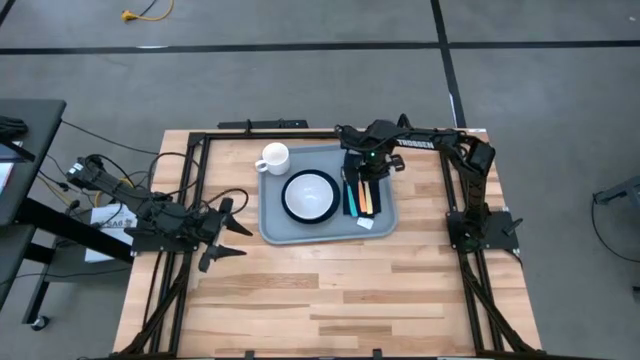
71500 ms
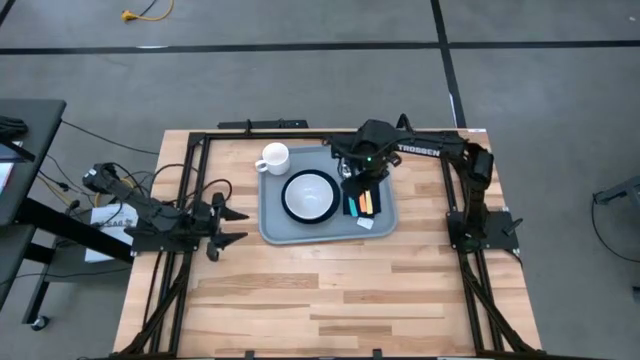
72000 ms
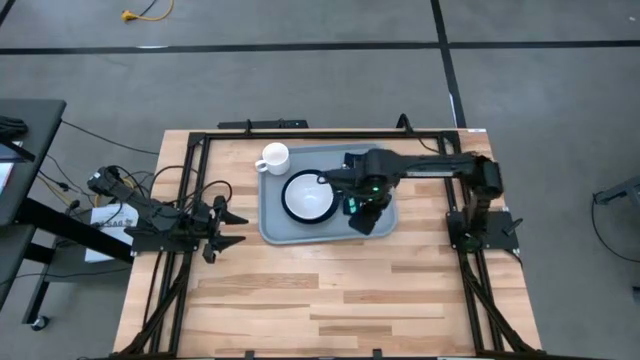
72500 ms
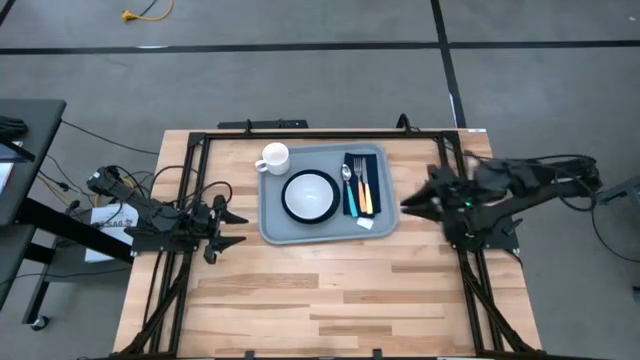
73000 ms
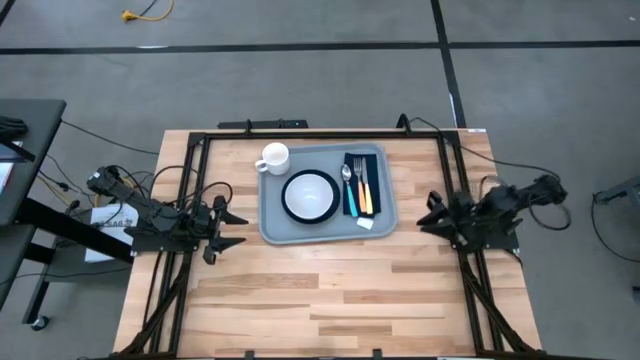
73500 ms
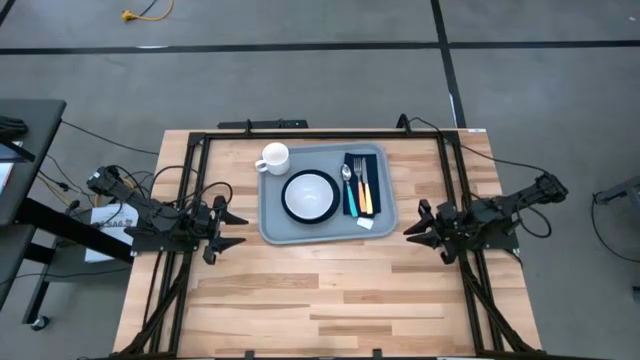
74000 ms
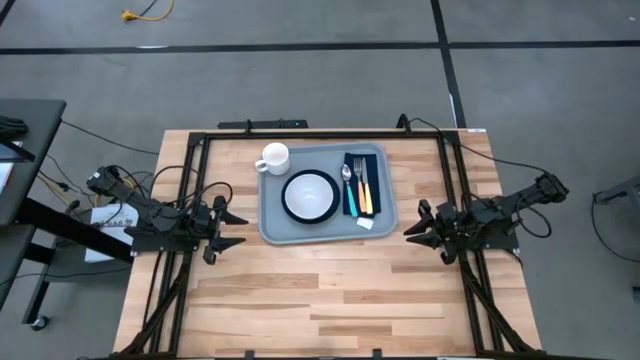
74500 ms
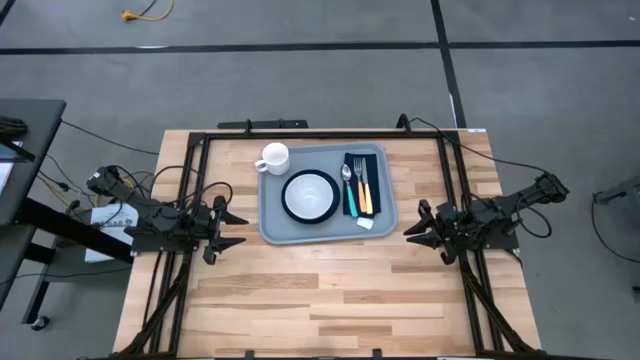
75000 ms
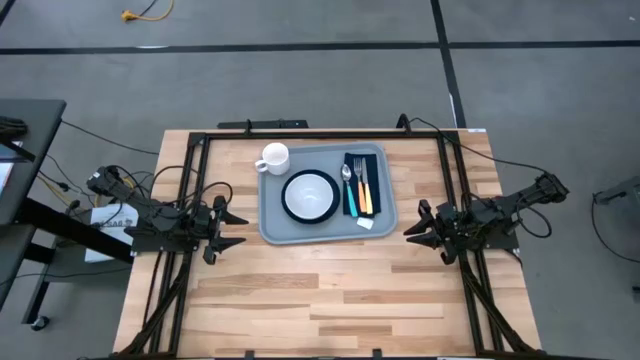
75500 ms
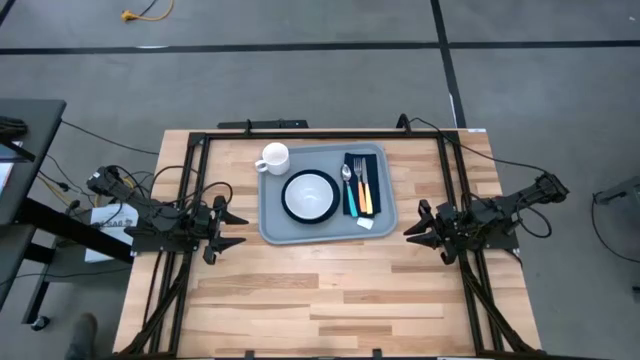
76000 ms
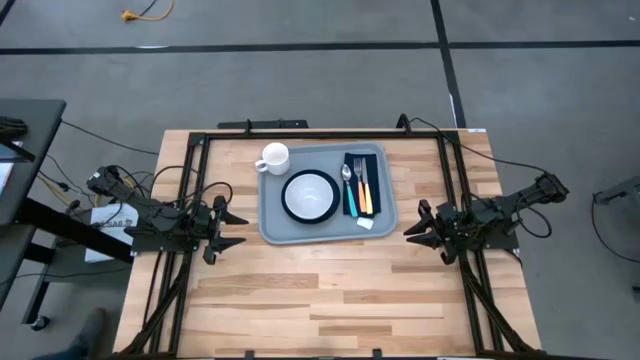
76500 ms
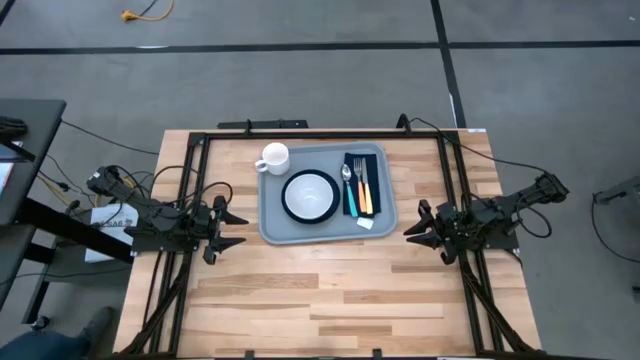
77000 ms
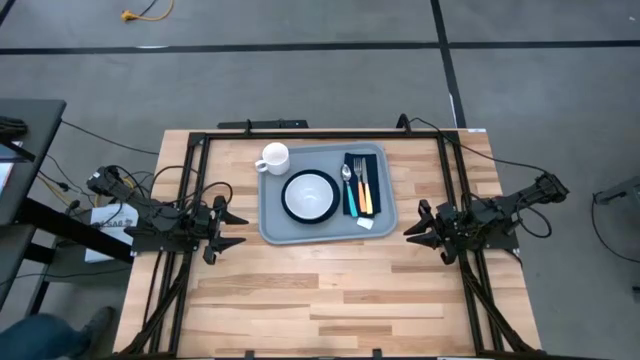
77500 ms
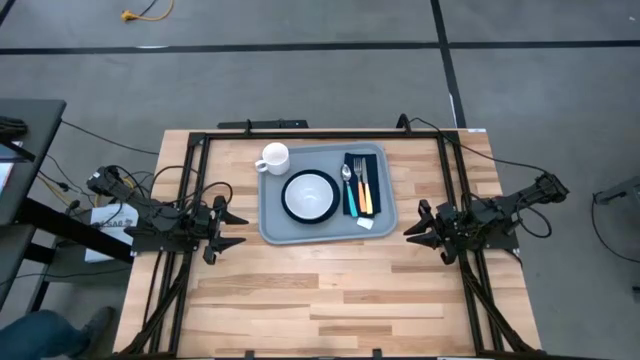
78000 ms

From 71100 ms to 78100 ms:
Task: Set up tray
Return to Home Position

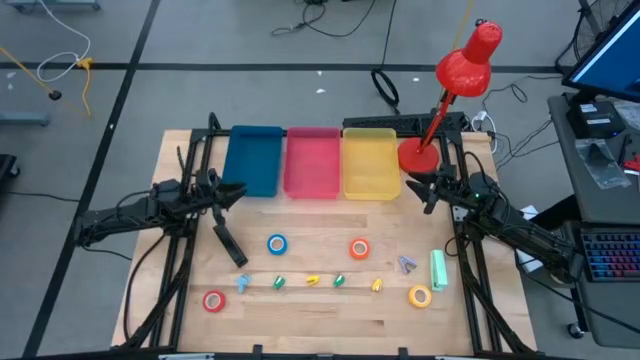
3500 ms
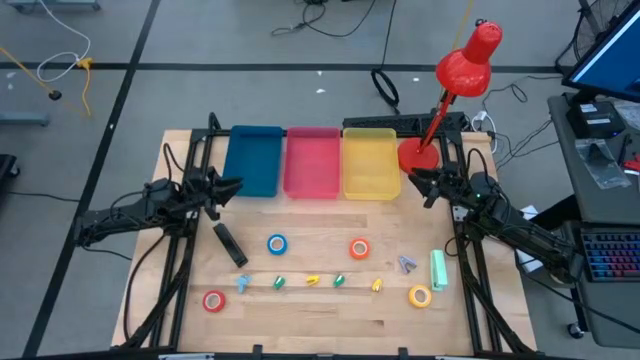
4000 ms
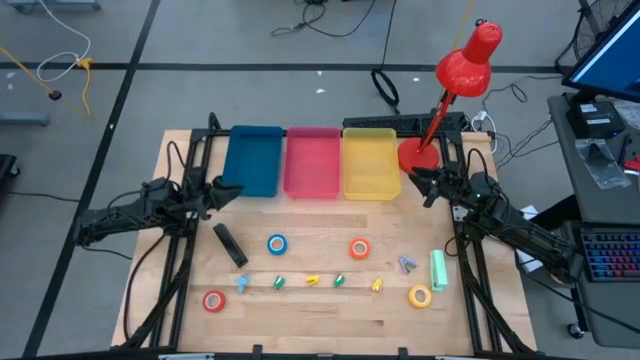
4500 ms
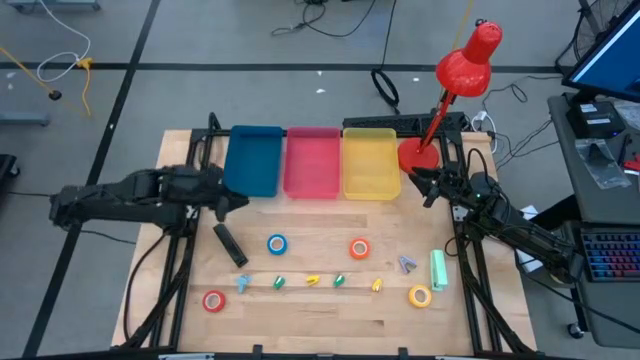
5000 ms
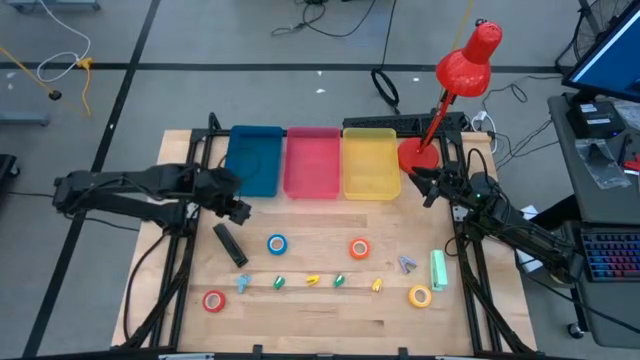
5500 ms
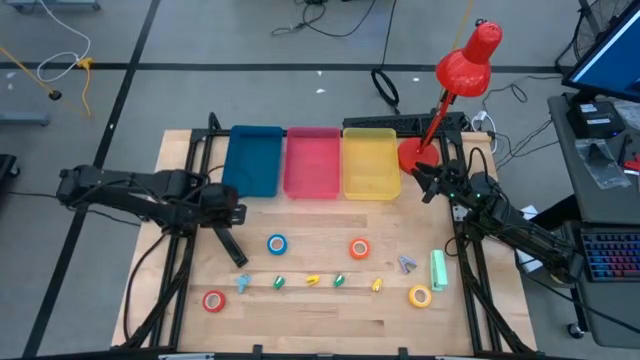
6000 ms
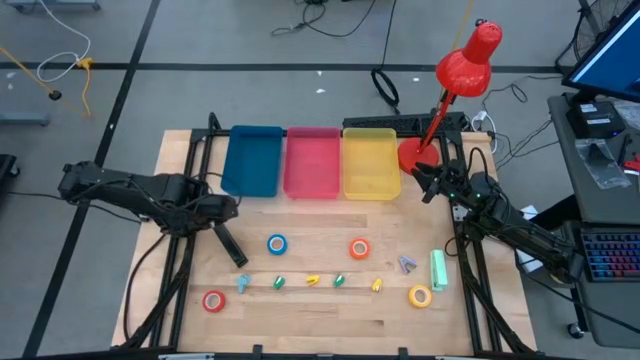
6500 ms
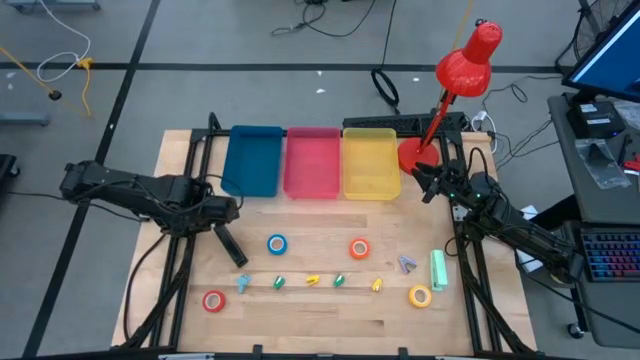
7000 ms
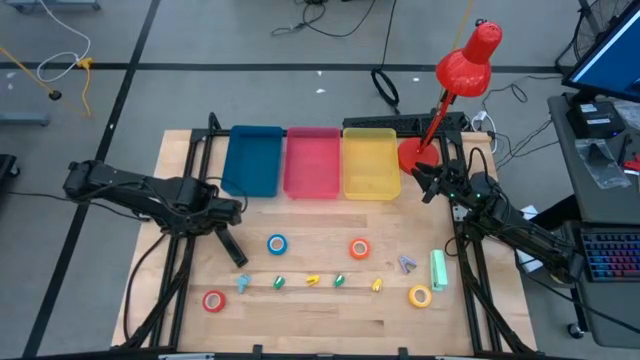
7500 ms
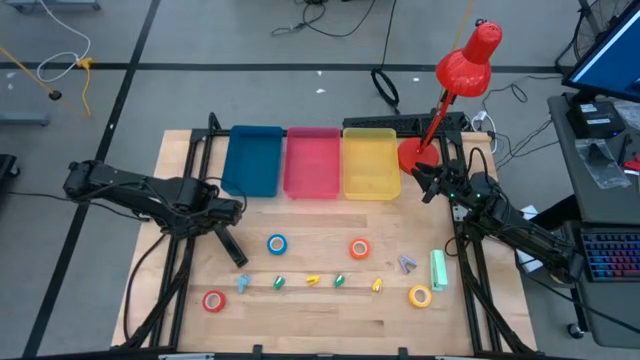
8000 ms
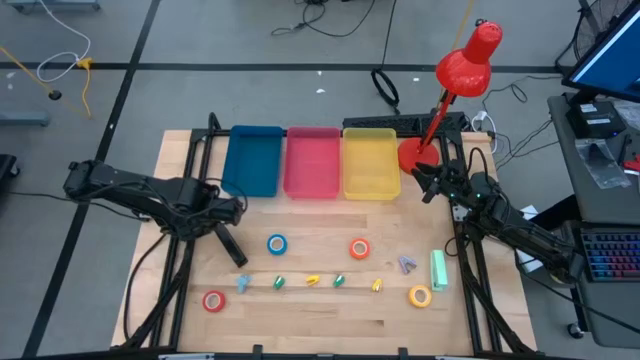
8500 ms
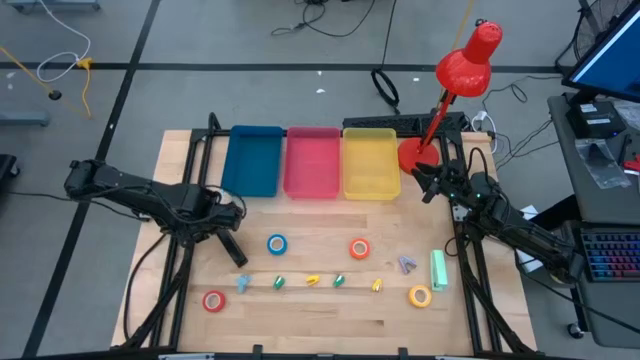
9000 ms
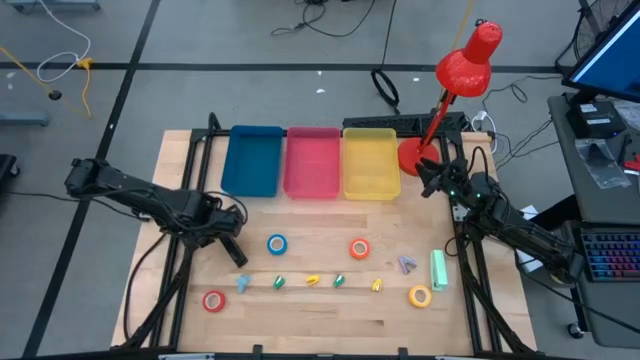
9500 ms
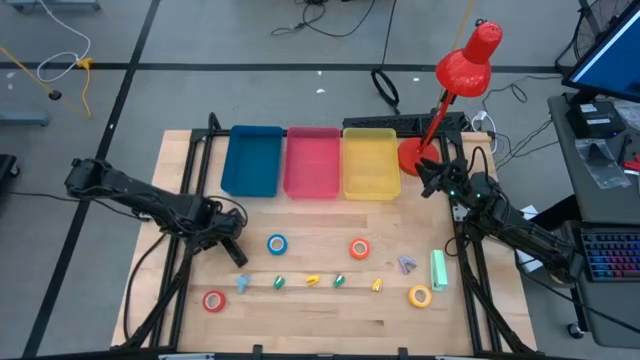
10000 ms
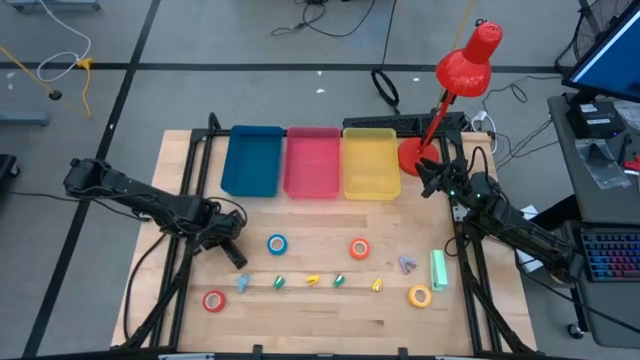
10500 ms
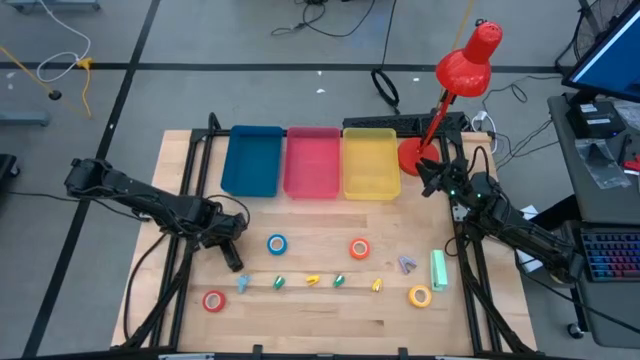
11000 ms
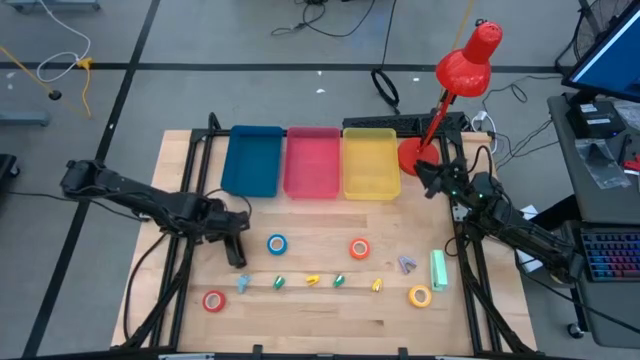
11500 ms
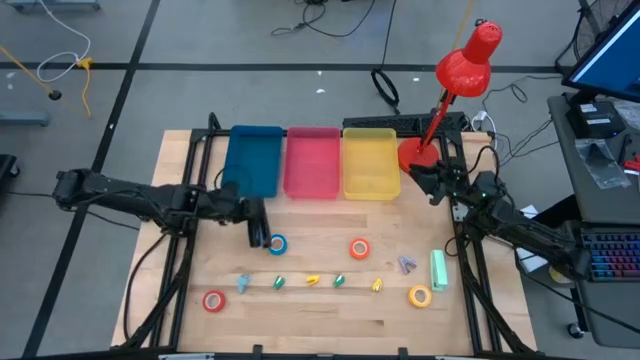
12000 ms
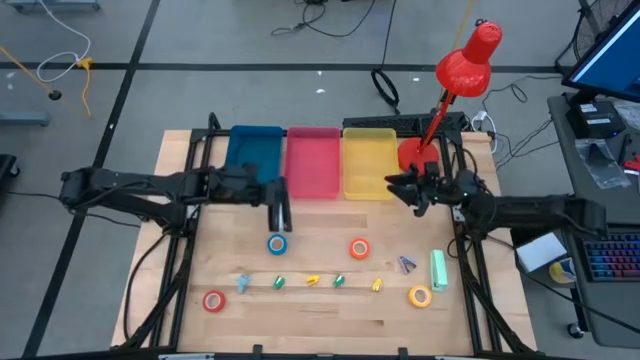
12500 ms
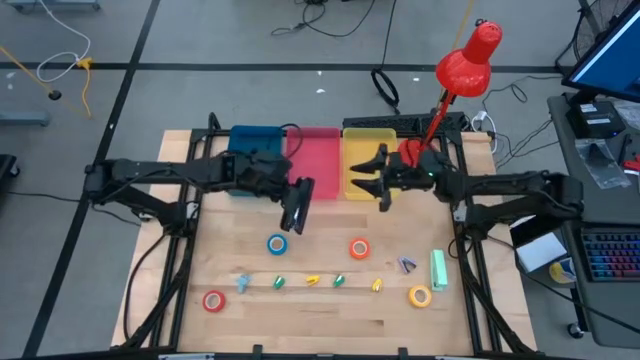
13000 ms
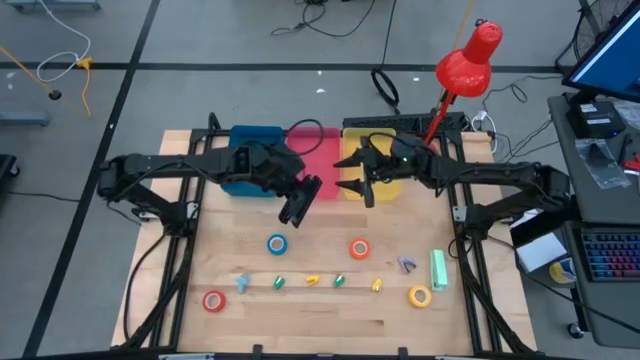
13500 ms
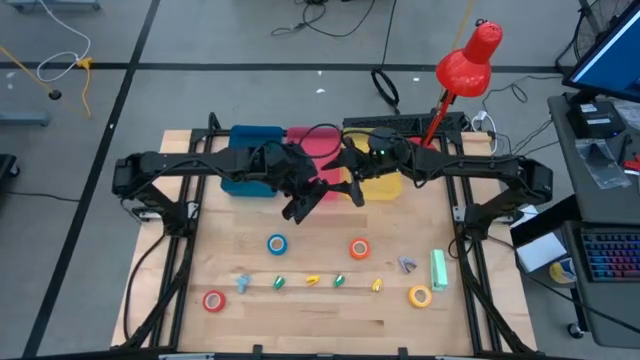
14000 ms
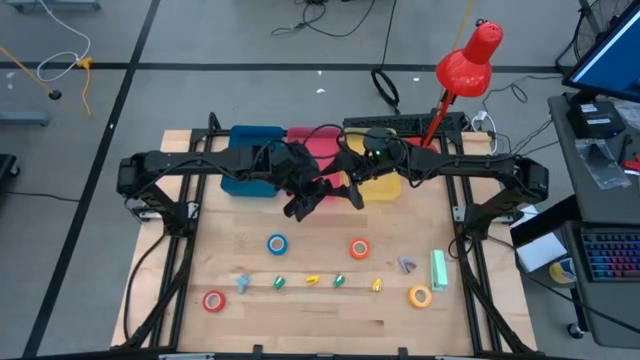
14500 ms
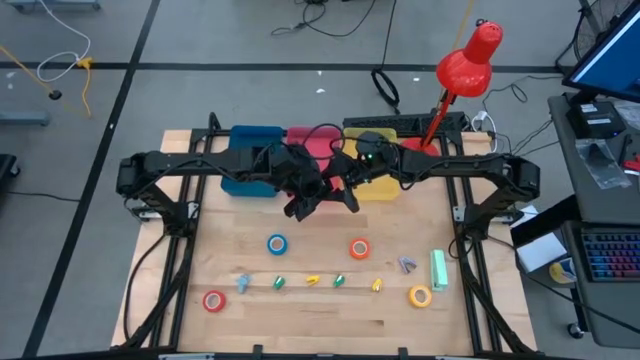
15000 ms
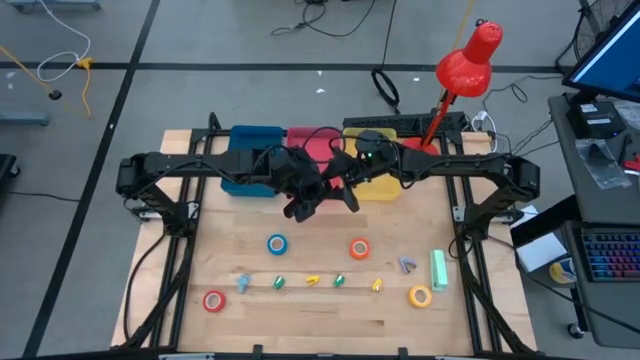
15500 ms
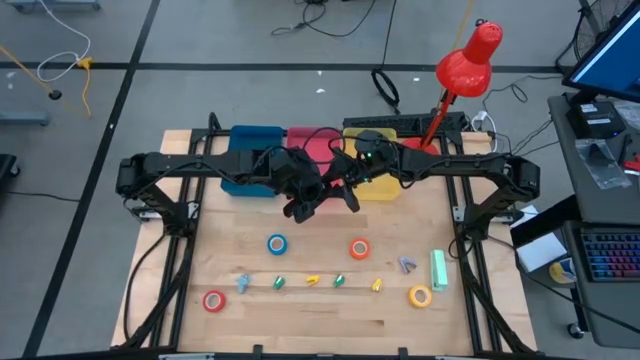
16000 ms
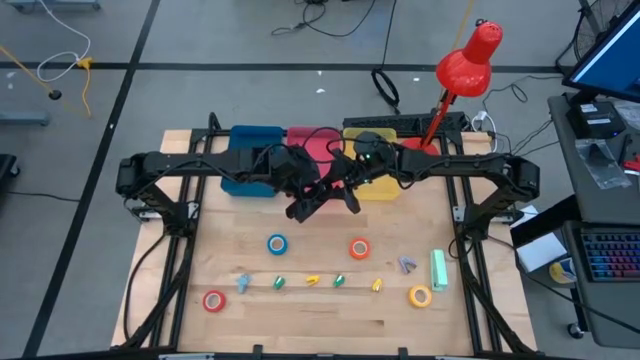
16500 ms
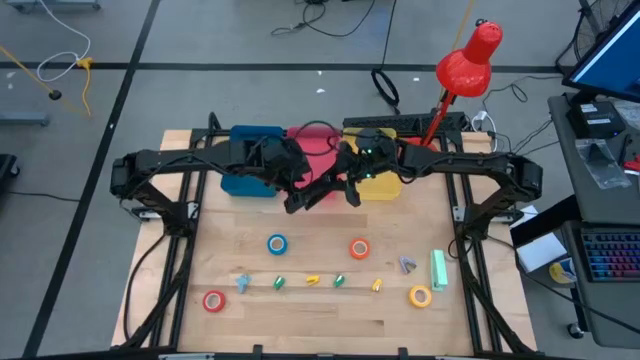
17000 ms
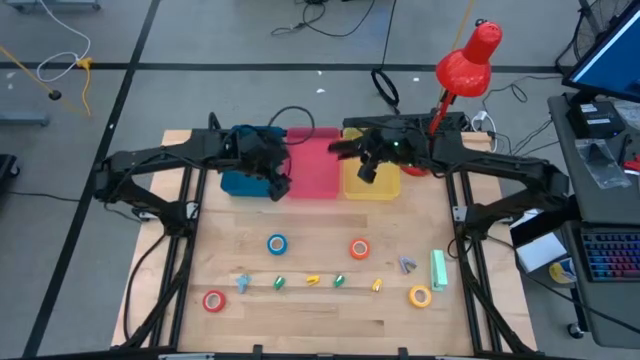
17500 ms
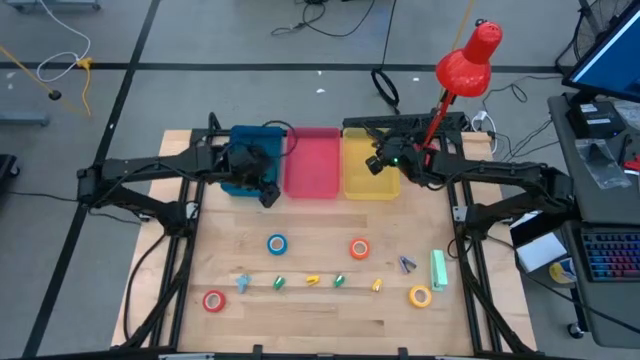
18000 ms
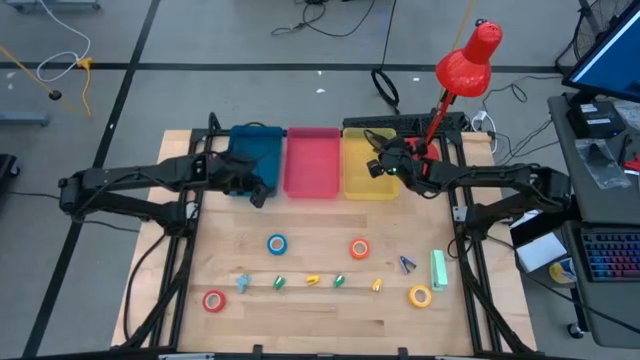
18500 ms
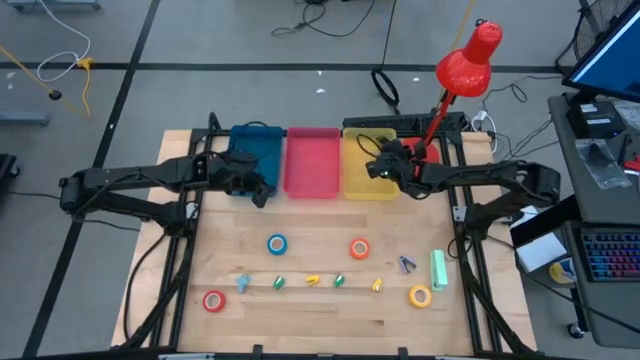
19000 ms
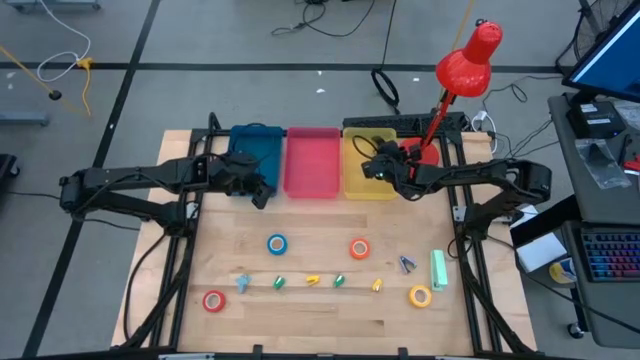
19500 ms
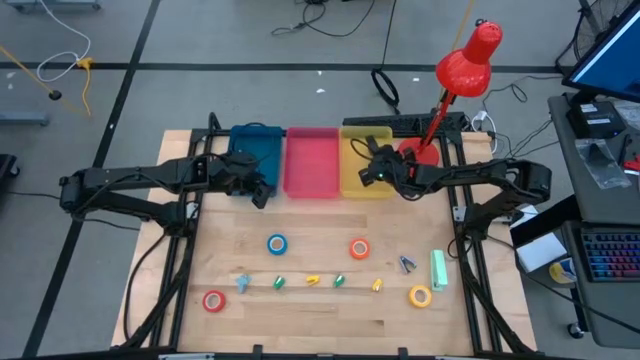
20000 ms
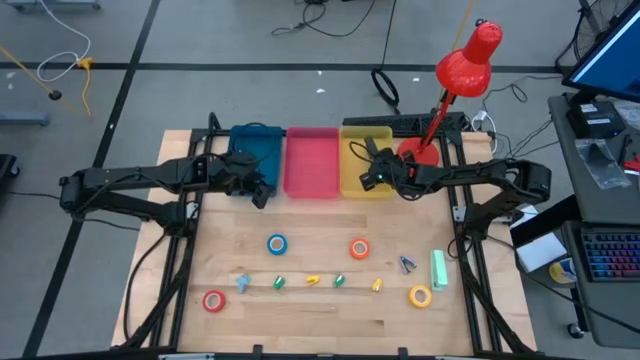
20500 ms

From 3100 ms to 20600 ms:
Task: Pick and place Stapler, Stapler remover, tape
Put the black stapler into the yellow bin
